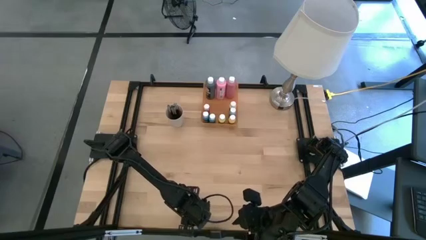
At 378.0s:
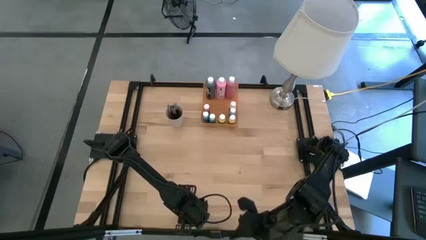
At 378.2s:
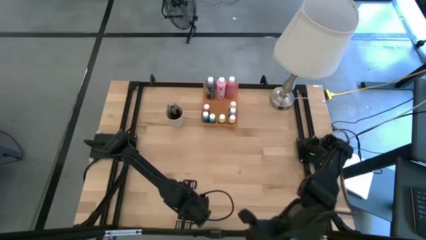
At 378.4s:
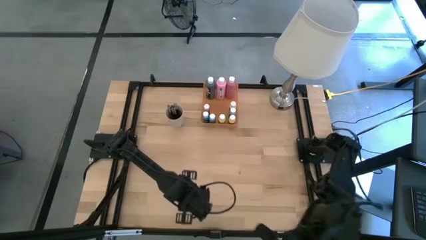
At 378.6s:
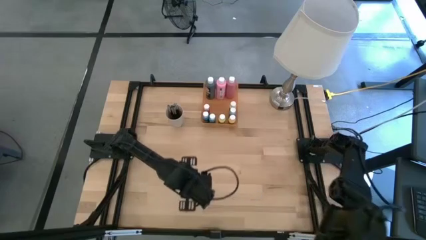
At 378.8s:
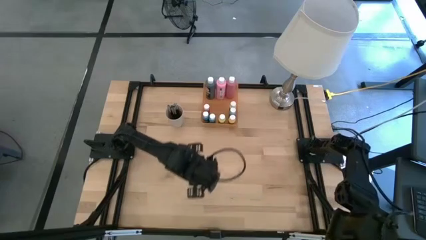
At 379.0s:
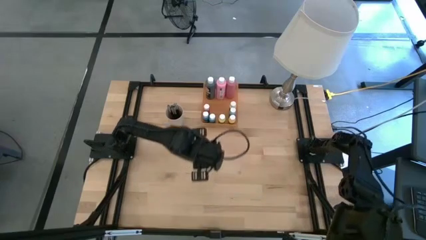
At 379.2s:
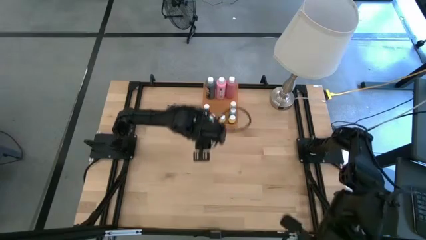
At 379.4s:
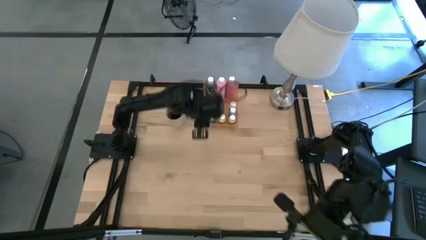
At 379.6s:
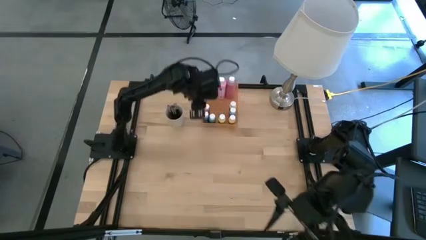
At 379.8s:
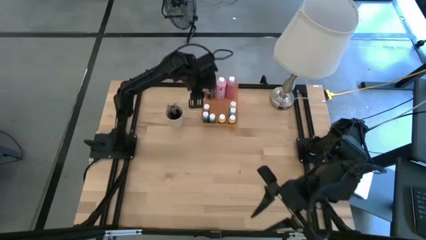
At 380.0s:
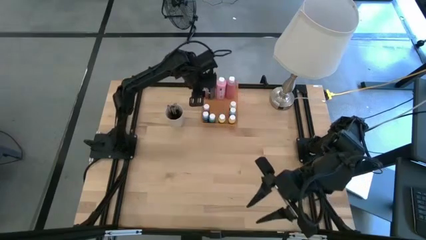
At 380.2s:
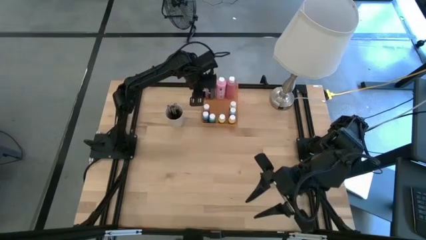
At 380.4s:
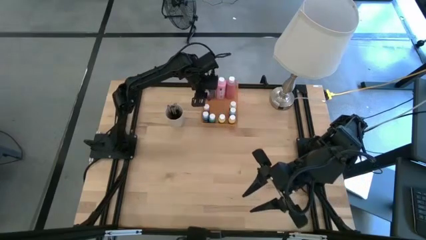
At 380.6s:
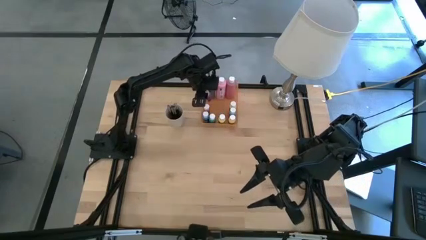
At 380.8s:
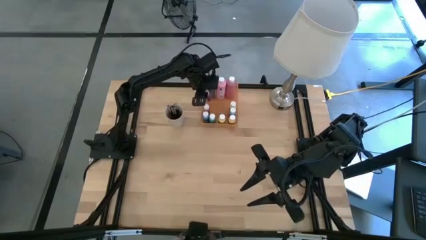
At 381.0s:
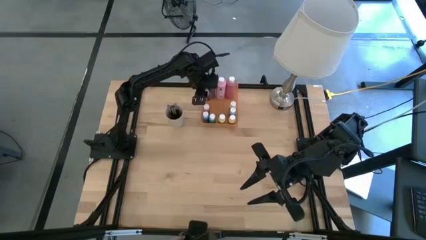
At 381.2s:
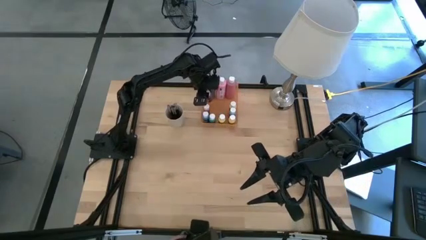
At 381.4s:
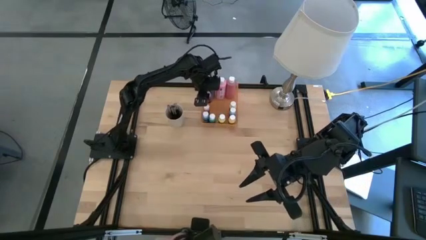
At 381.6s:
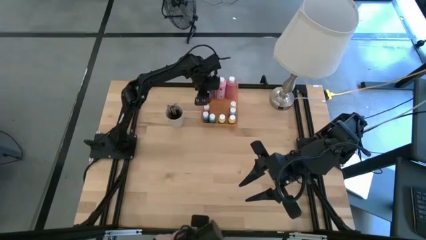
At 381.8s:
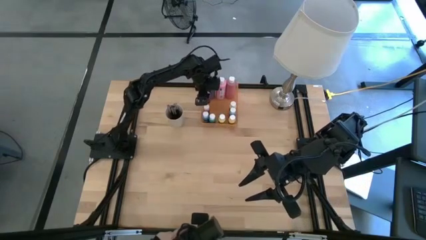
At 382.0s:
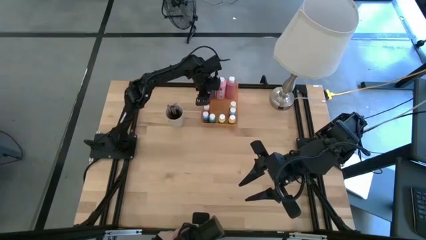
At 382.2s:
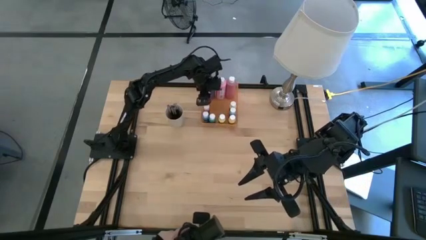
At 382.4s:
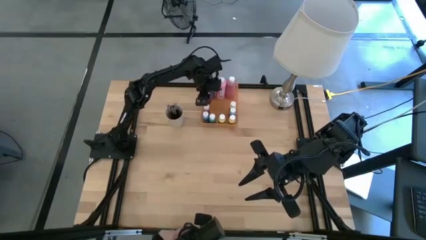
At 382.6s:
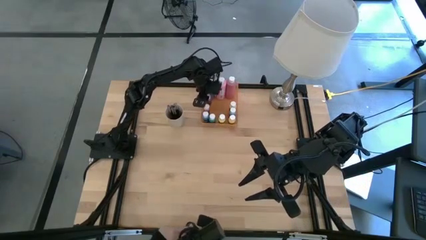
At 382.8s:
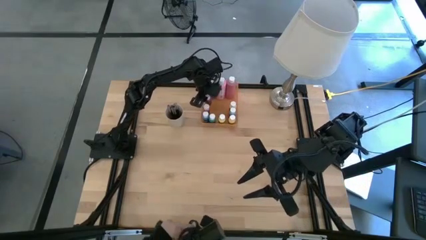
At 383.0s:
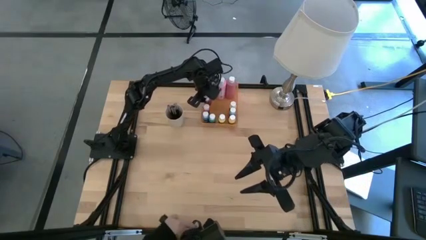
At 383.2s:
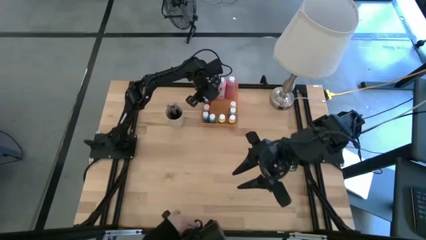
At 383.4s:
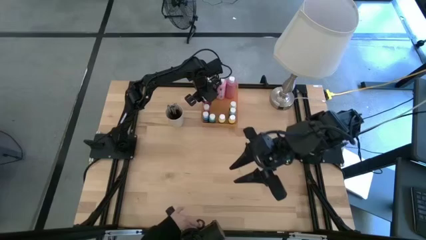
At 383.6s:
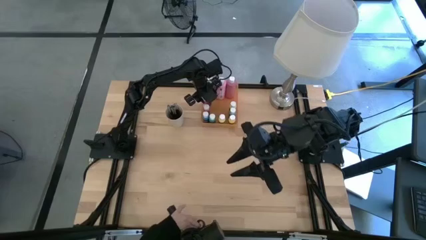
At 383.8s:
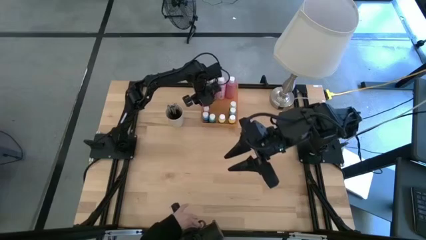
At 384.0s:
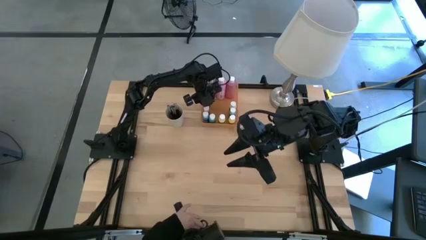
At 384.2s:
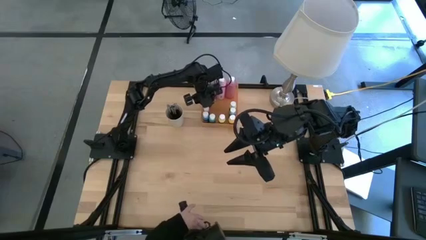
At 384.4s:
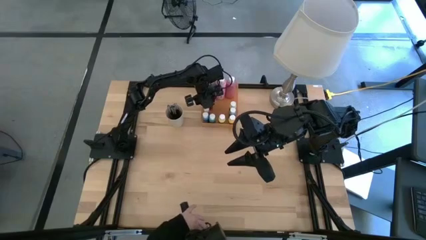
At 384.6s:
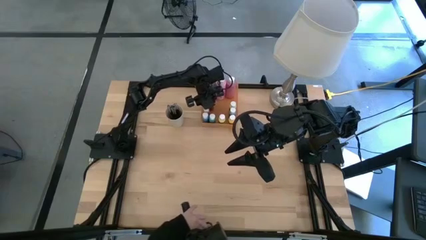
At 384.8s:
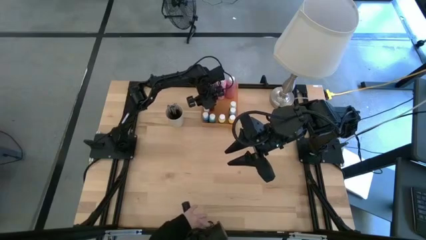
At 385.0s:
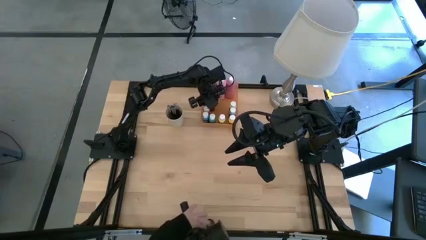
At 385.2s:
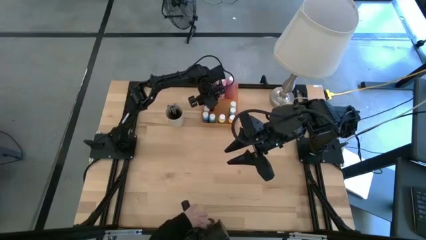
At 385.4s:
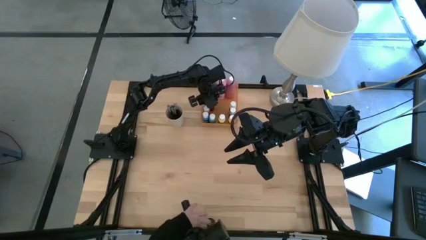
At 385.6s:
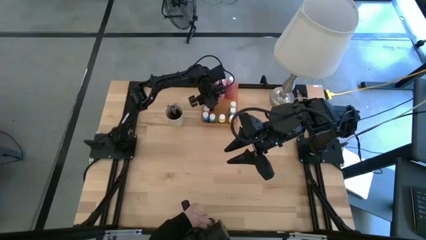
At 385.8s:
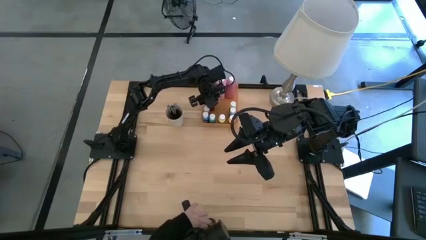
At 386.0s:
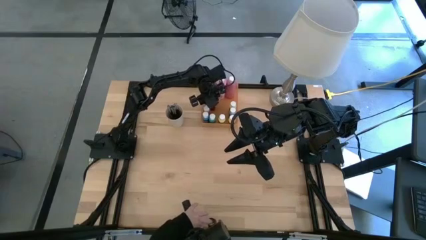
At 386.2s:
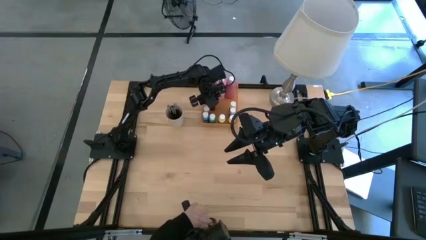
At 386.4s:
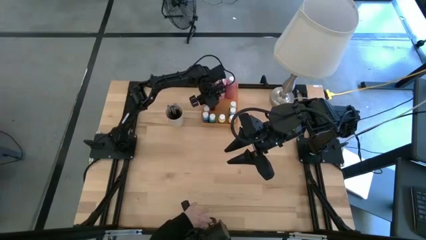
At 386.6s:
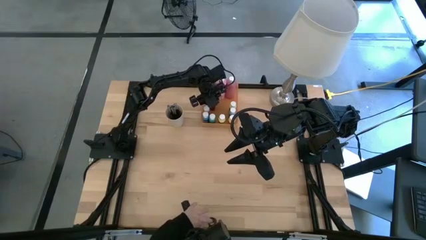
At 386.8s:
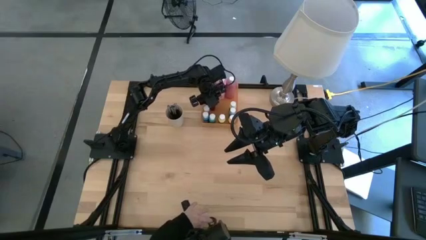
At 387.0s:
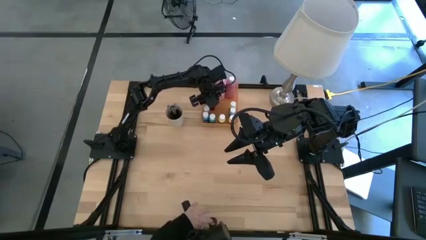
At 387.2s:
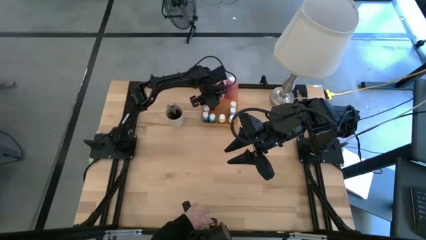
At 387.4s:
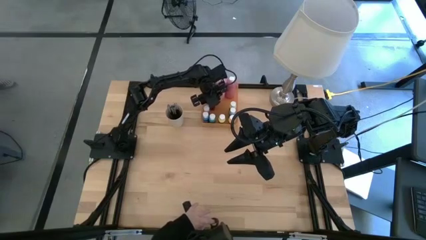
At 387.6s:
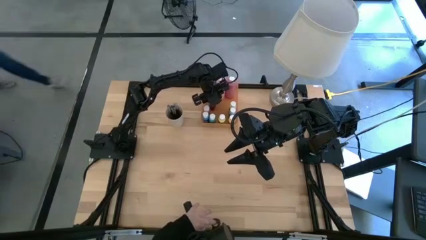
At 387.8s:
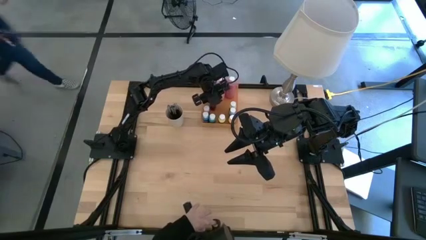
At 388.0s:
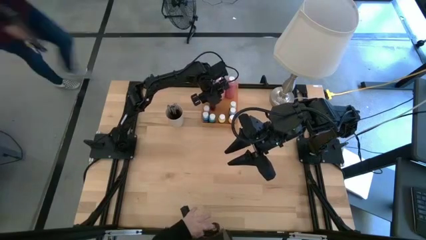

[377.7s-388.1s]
Task: Pick & Place Paint Supplies
Put the pink paint bottle into the orange bin

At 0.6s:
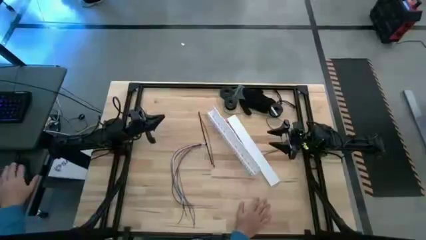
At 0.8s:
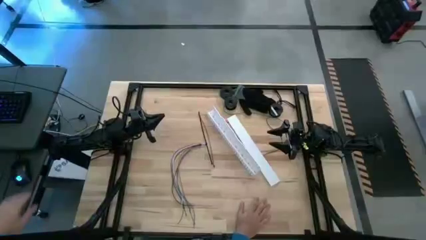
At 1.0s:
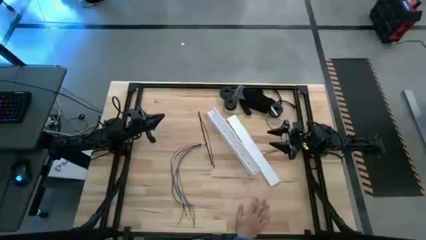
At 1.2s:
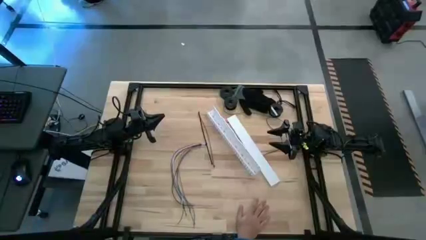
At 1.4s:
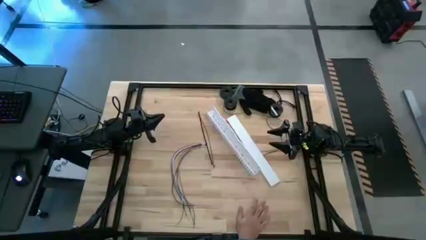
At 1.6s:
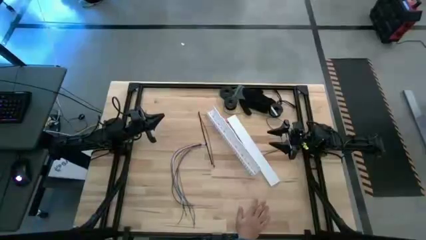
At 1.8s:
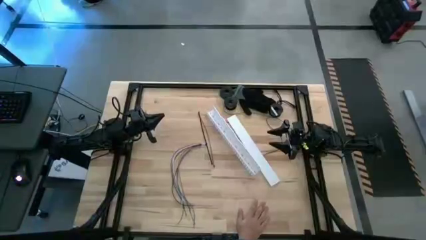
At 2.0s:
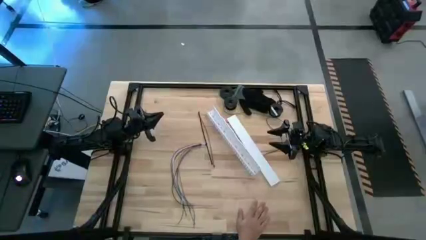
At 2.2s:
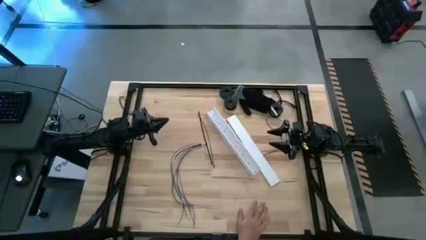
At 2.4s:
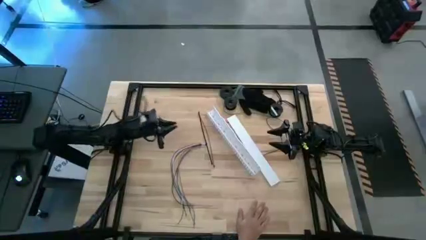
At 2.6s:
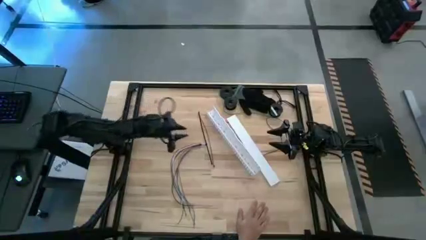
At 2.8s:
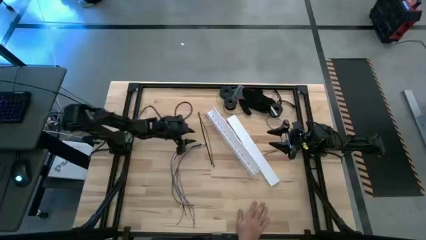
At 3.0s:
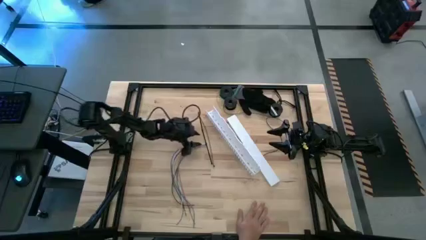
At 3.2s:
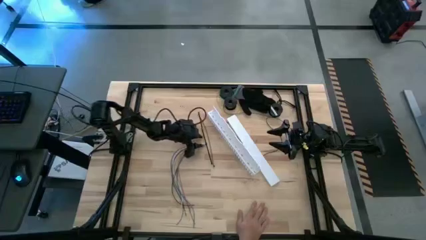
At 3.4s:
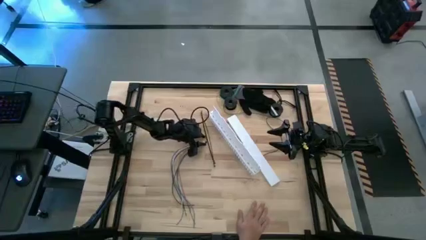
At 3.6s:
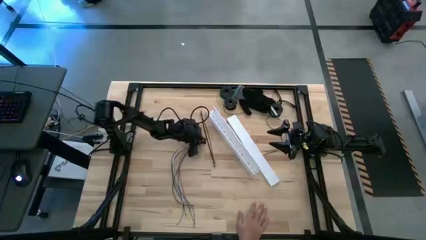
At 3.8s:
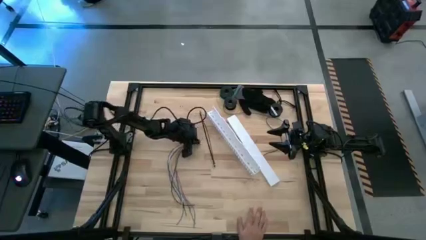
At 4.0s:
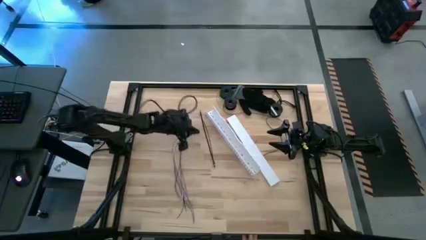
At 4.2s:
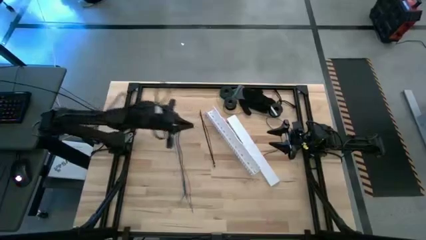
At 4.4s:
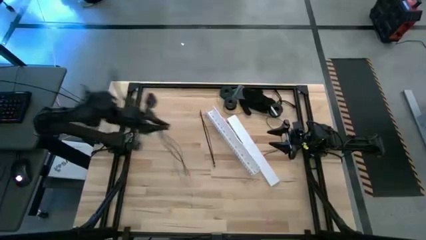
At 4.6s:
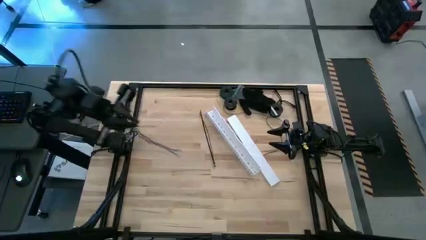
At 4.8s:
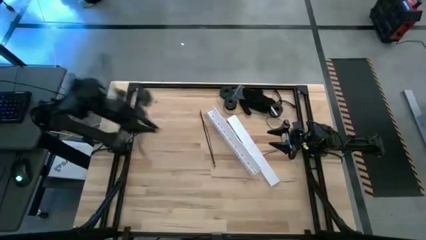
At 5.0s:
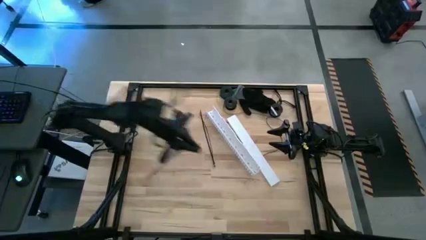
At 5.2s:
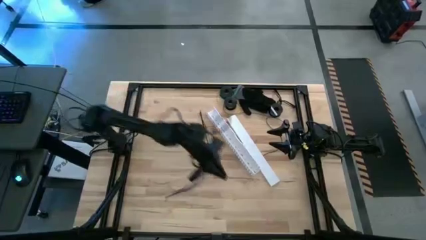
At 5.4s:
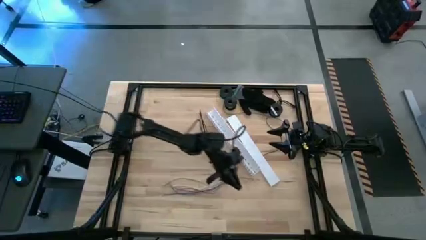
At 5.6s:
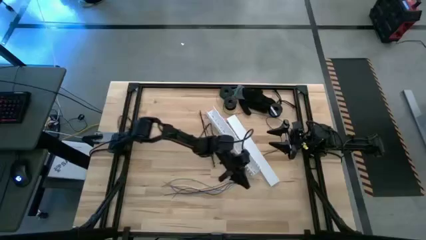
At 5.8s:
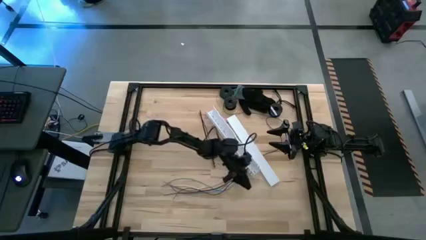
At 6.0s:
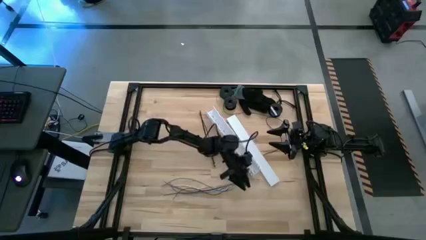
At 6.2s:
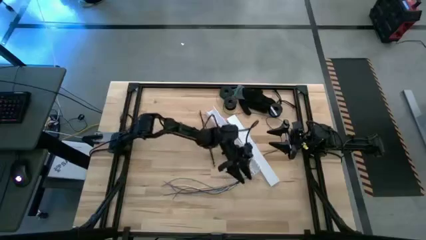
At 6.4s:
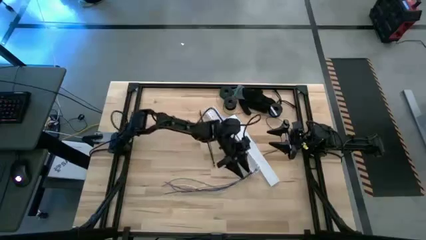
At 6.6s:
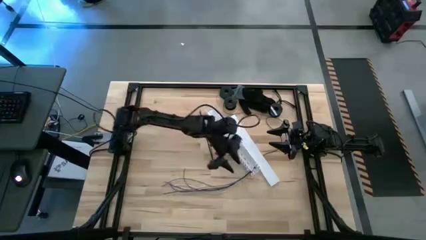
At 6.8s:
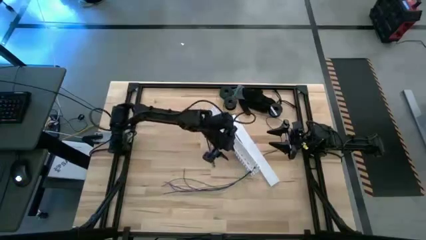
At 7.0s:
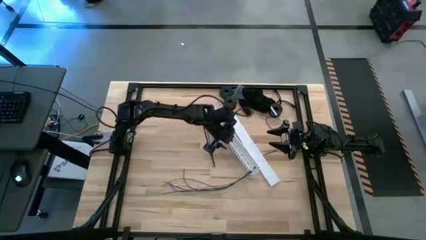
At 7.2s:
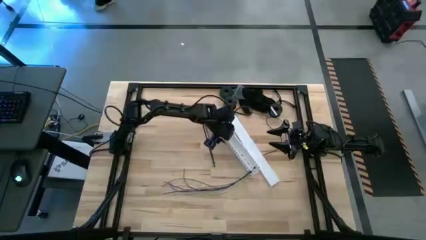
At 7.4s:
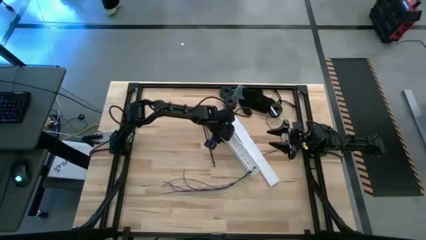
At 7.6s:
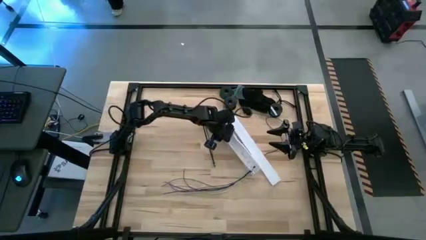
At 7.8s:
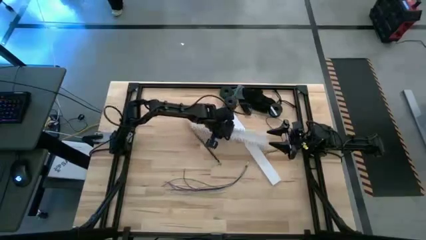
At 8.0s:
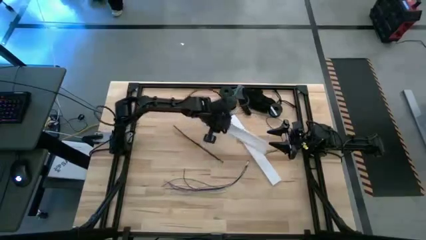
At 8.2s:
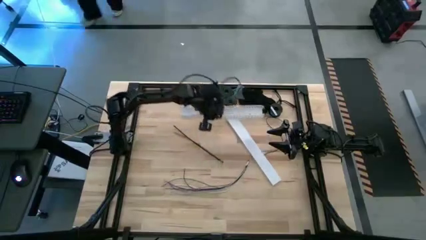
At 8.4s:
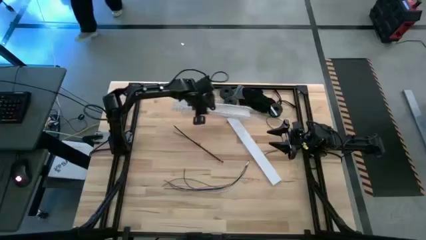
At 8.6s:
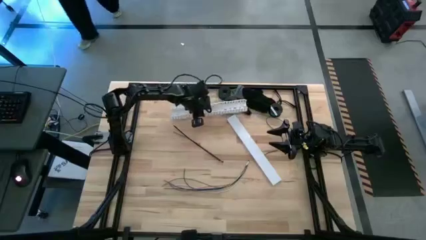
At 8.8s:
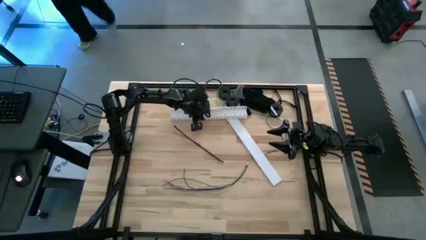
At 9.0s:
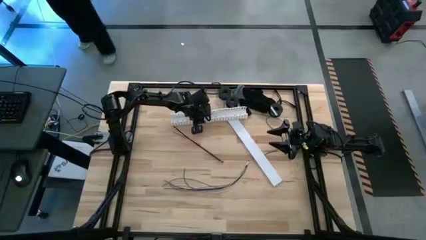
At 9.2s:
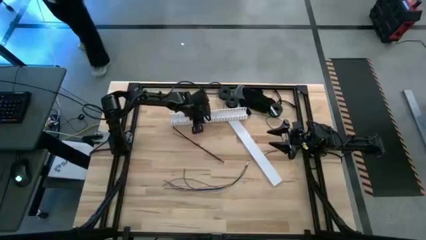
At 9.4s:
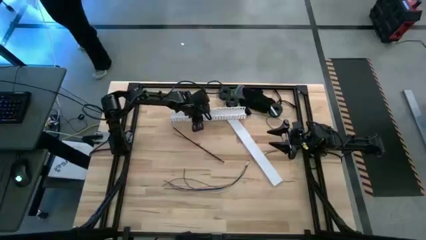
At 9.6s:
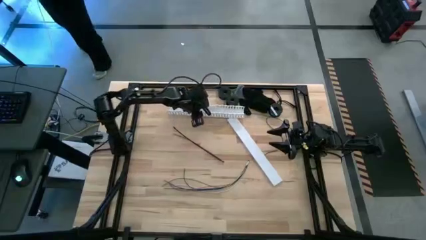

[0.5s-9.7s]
Task: Ziptie cables
Move the white cable duct to the top of the table
